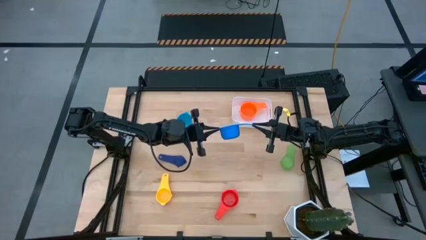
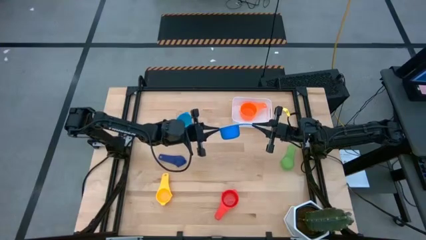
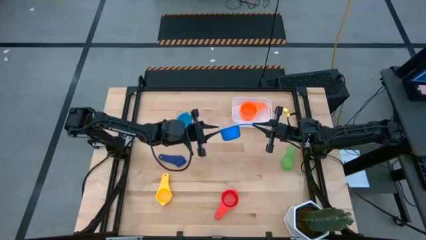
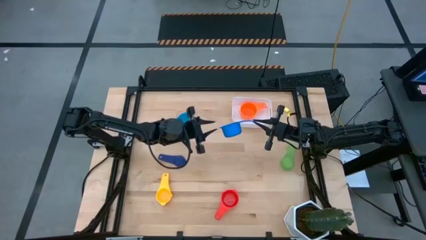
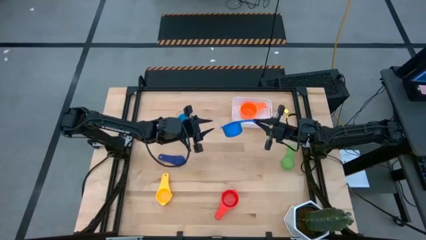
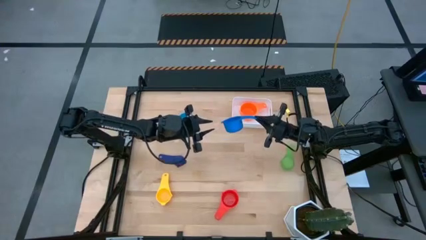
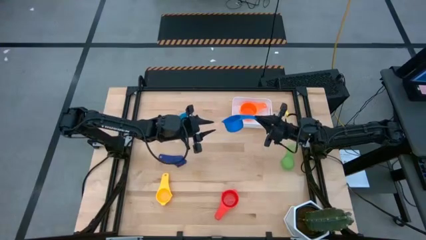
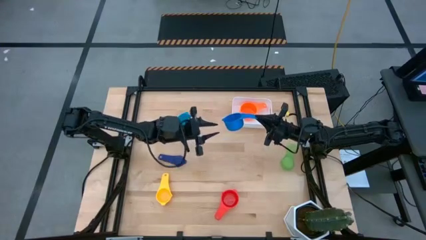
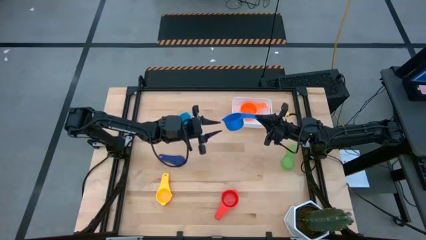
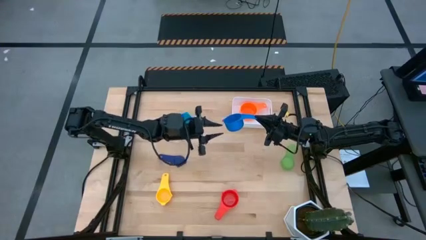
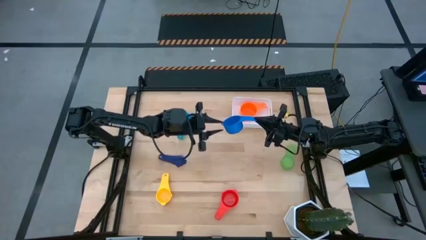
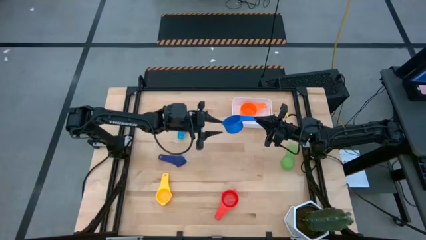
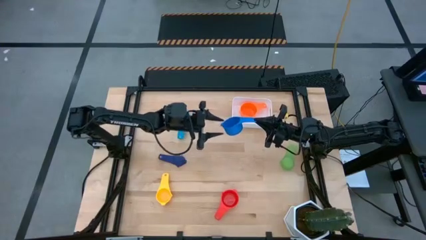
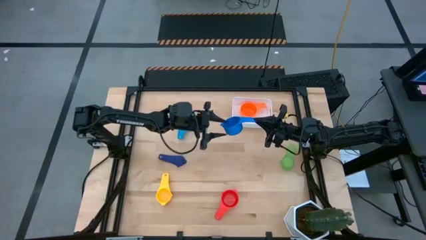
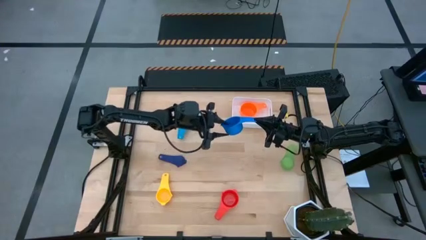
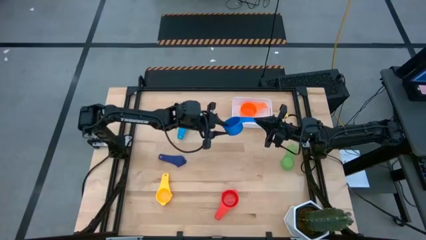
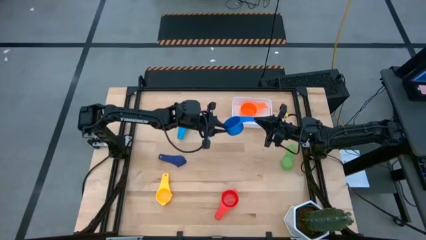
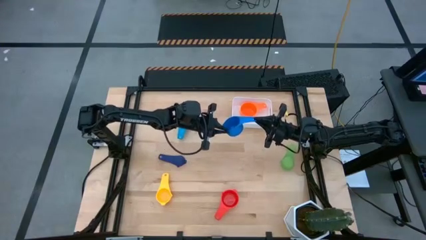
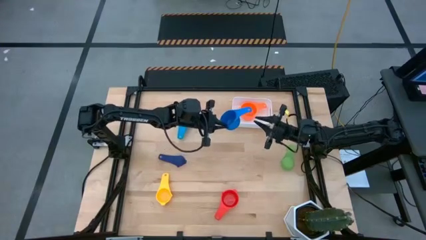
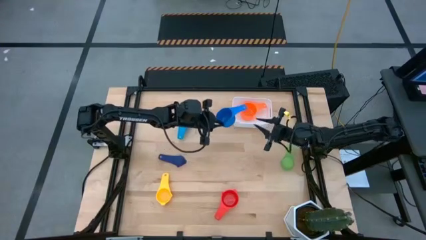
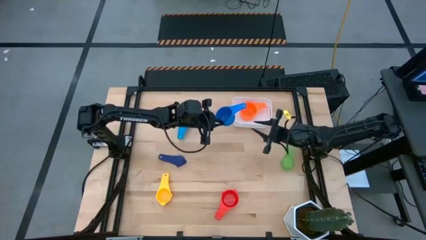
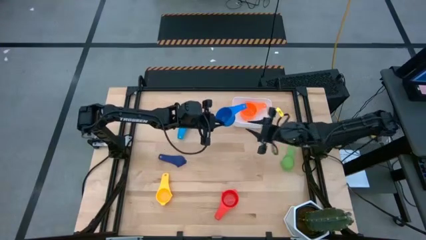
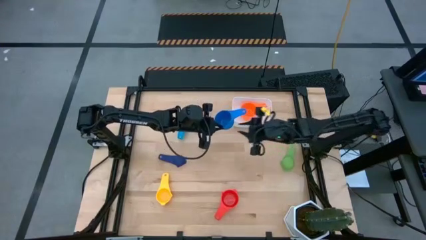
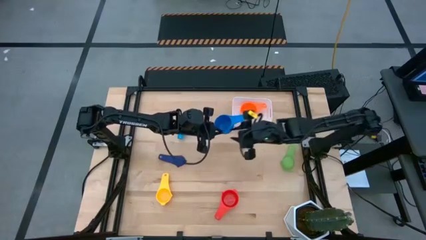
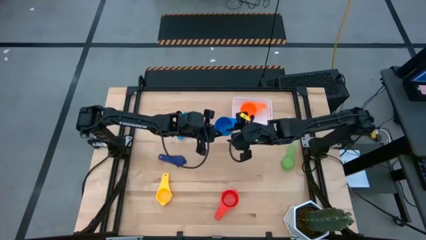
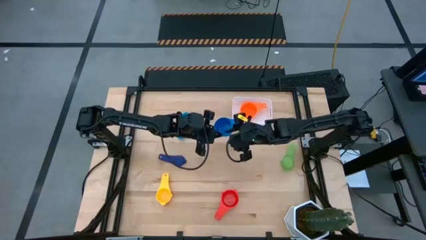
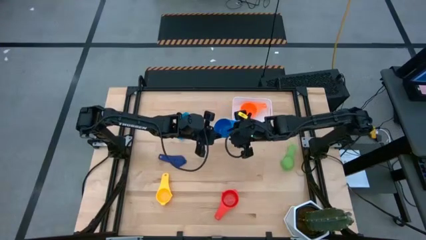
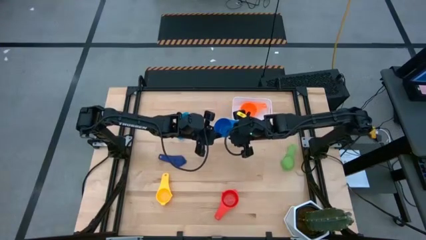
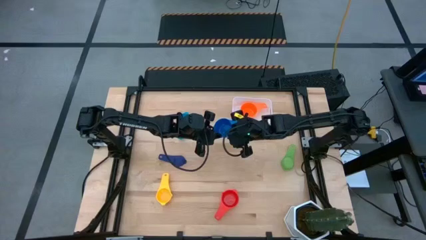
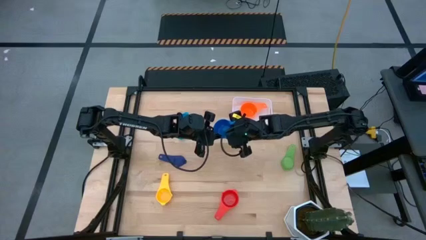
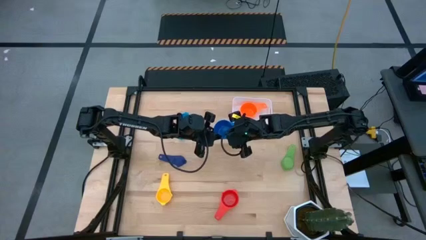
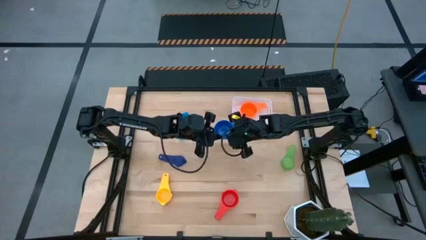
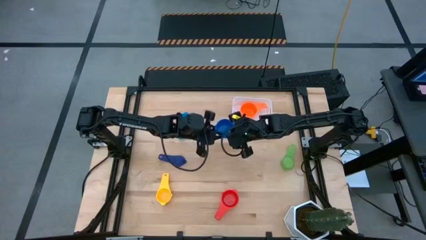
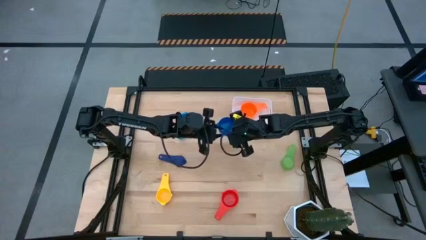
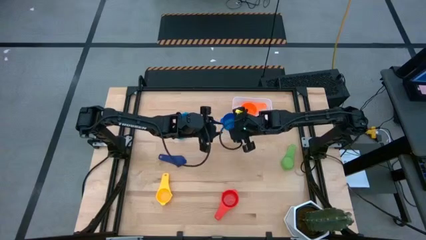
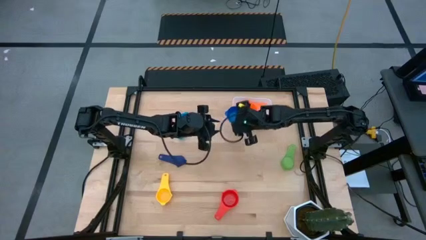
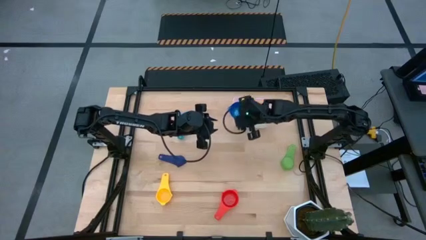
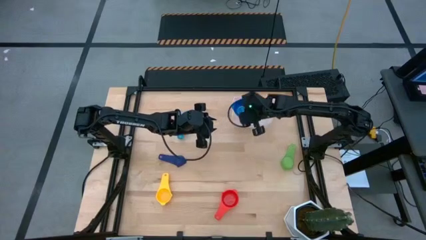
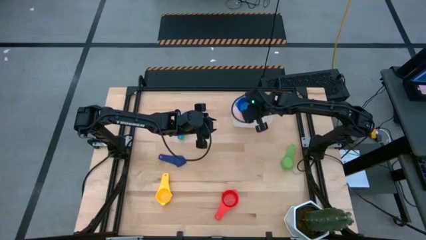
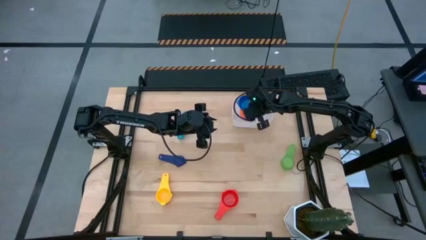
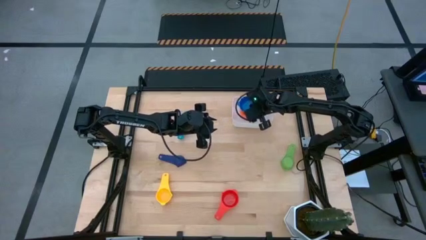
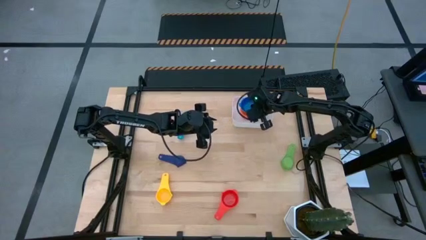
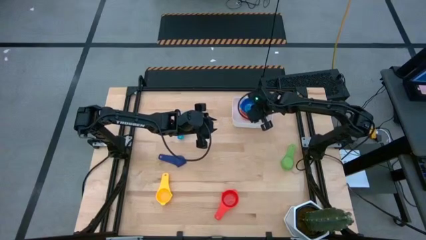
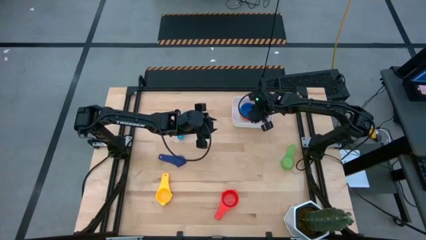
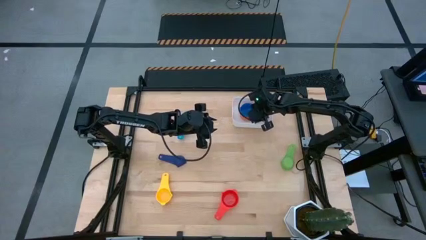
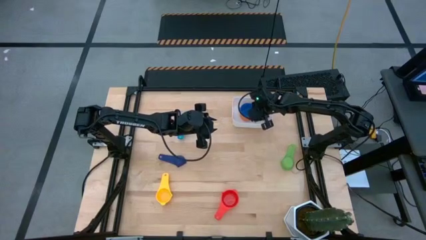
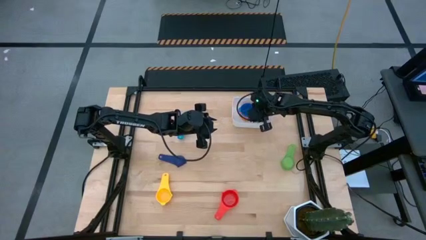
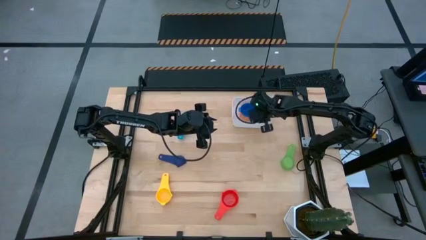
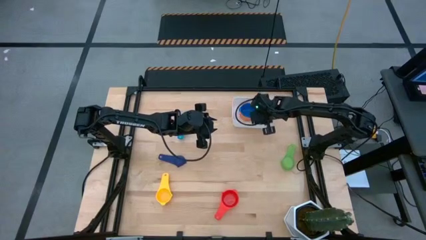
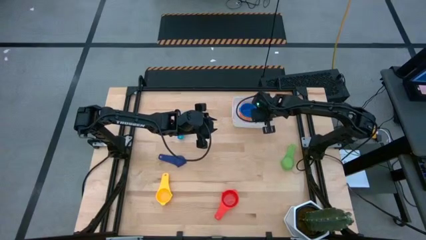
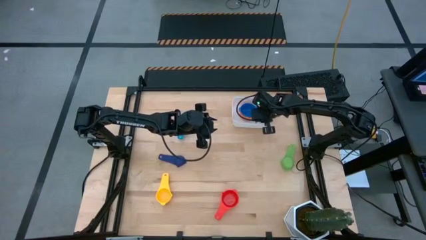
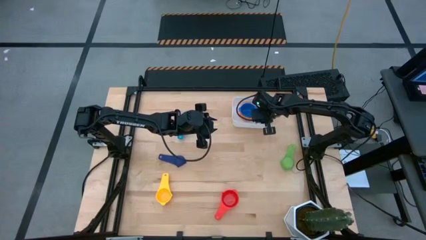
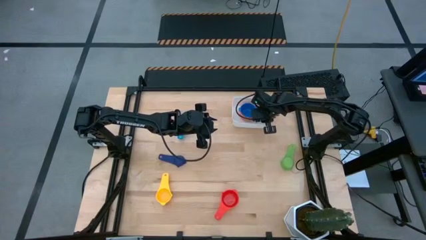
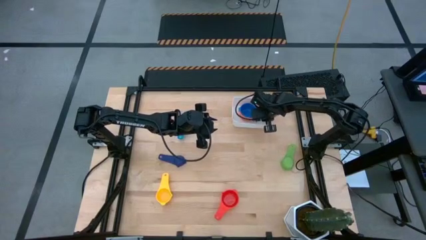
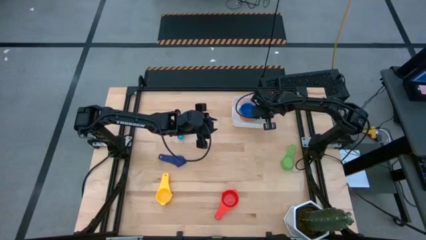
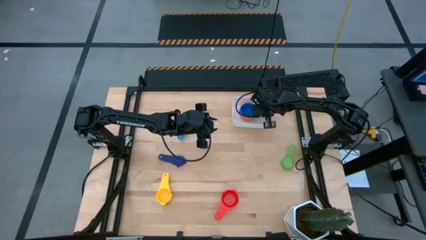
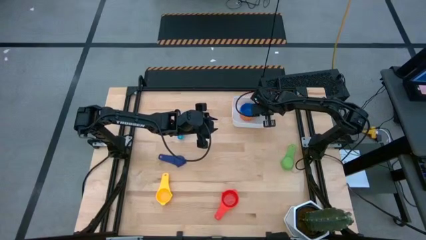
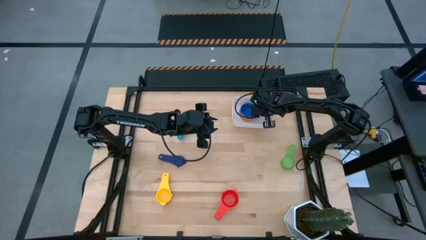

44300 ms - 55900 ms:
Task: Nest measuring cups in basket
Stack the blue measuring cup on top of the orange measuring cup in the white bin
